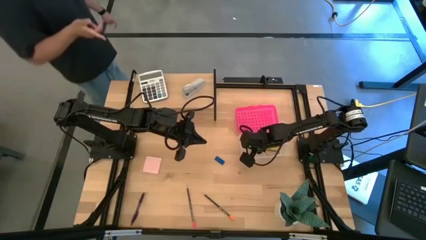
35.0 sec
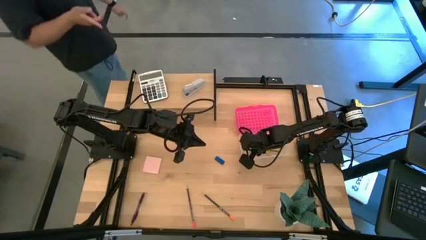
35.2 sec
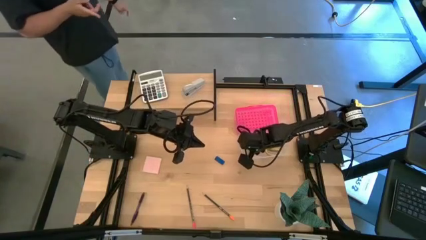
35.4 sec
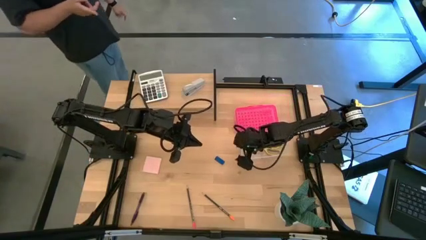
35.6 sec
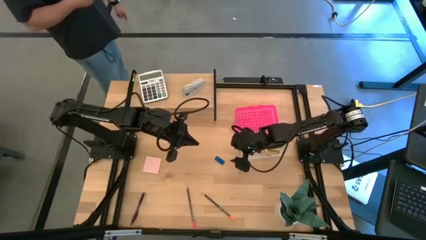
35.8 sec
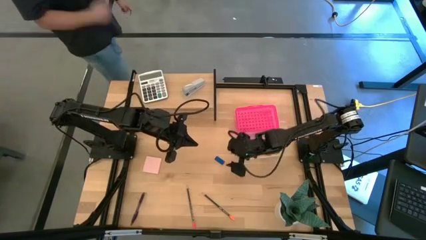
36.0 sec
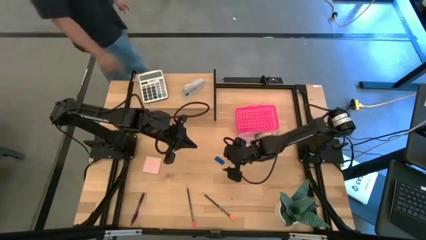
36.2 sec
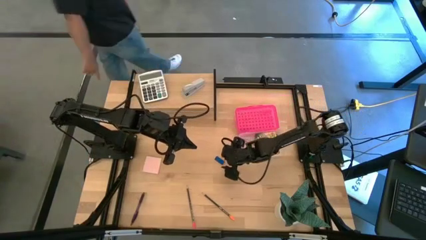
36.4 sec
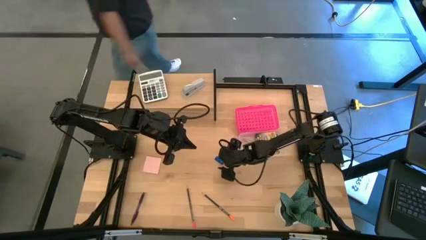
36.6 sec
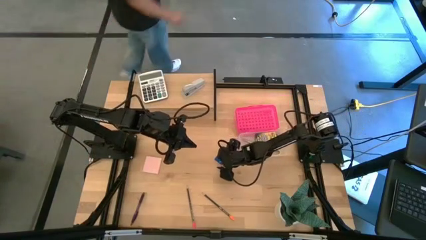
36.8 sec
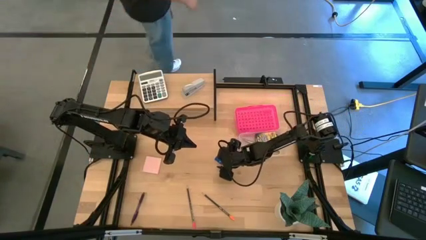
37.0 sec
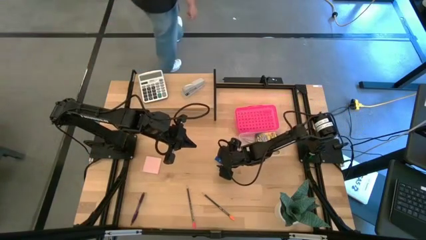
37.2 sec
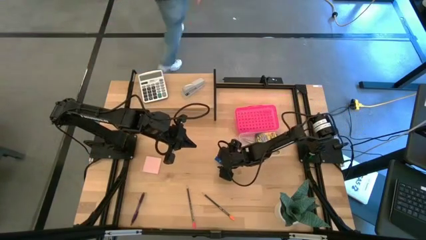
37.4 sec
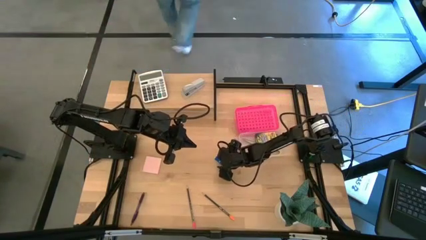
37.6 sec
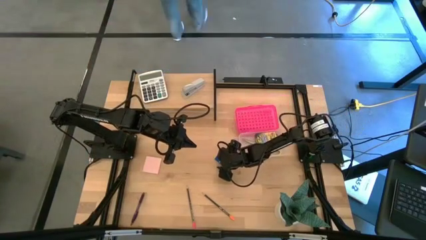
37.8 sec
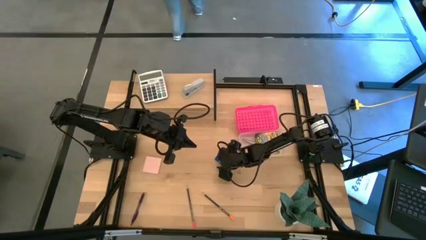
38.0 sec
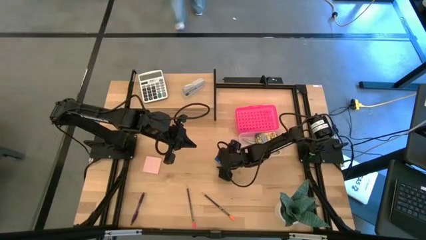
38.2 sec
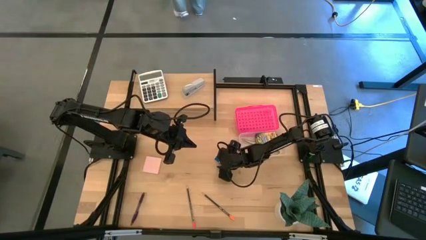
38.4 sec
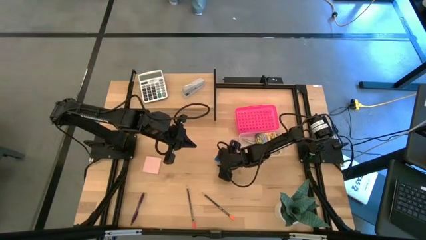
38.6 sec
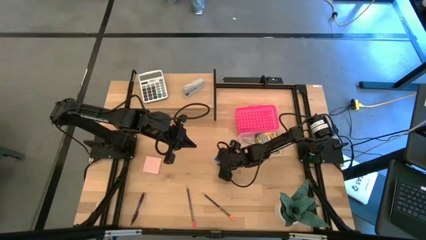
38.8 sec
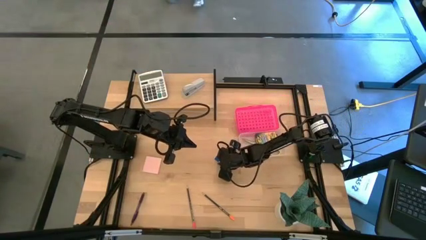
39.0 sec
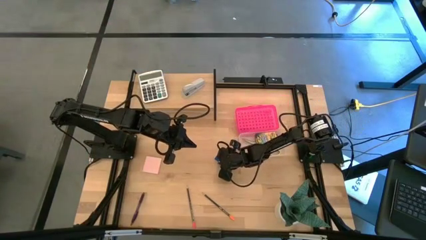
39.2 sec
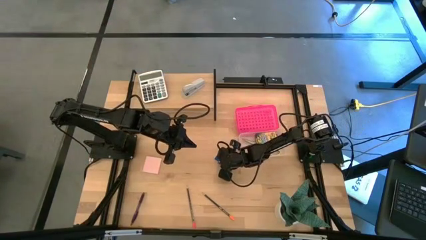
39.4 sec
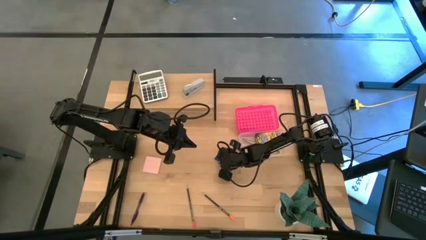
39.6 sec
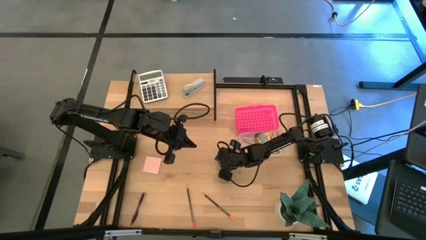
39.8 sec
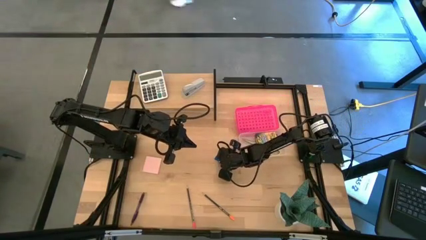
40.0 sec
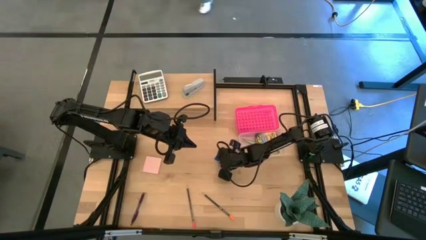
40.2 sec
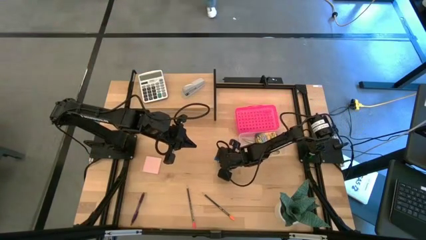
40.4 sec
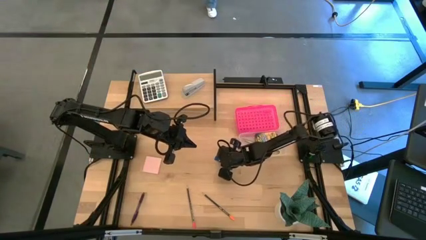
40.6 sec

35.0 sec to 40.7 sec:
Task: Pack school essentials
Put the blue eraser into the pink supply box

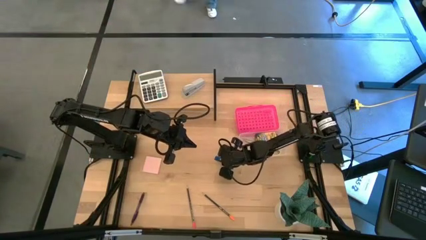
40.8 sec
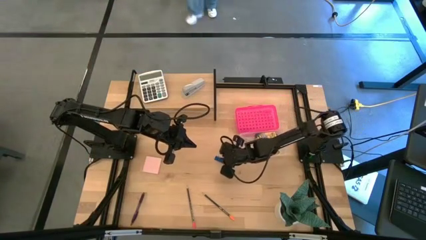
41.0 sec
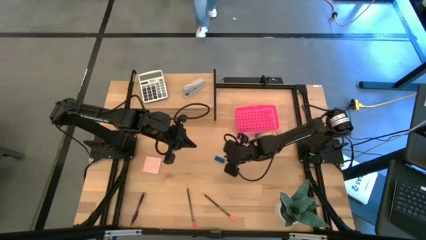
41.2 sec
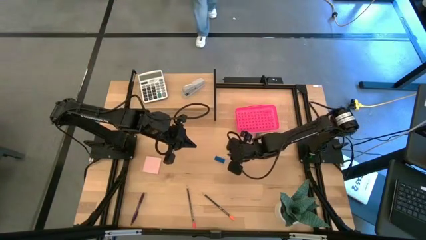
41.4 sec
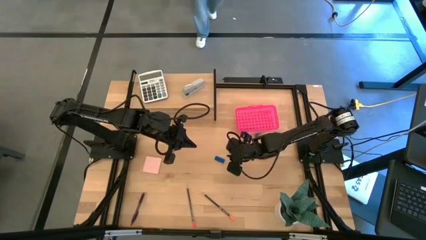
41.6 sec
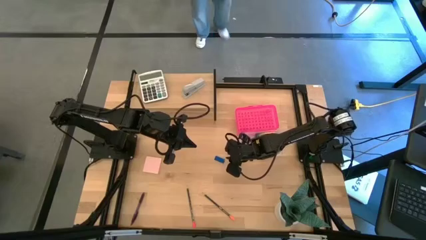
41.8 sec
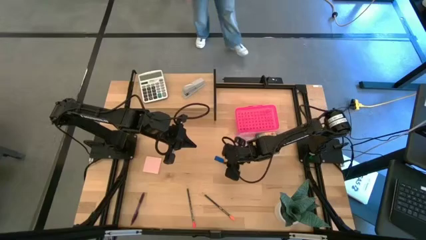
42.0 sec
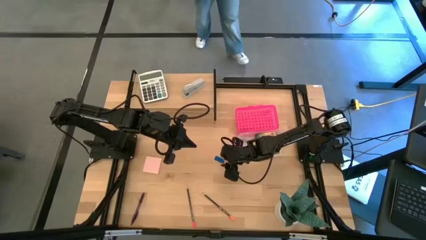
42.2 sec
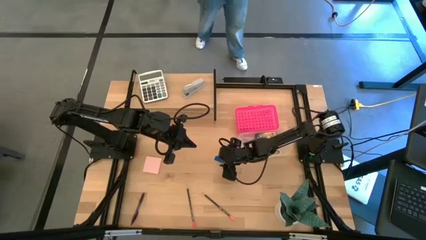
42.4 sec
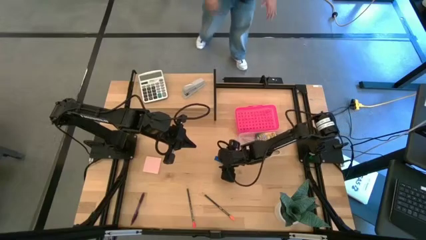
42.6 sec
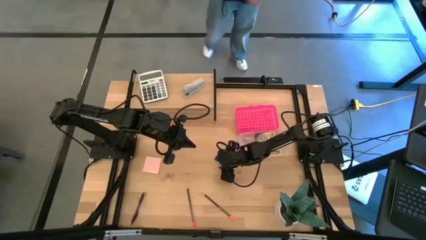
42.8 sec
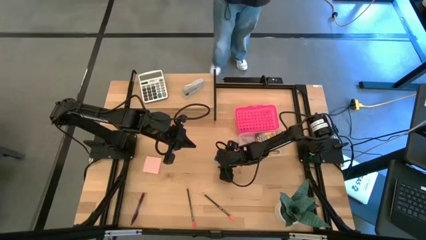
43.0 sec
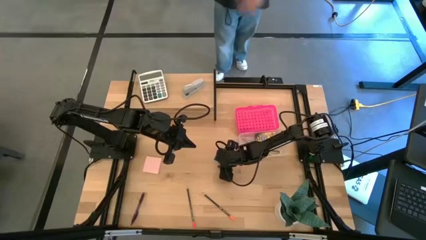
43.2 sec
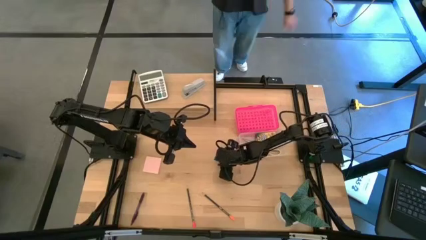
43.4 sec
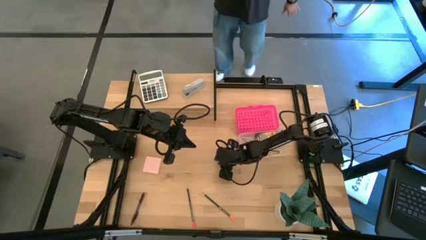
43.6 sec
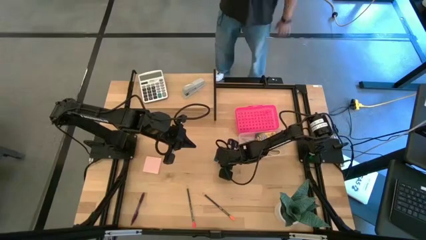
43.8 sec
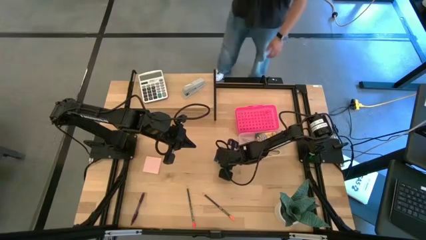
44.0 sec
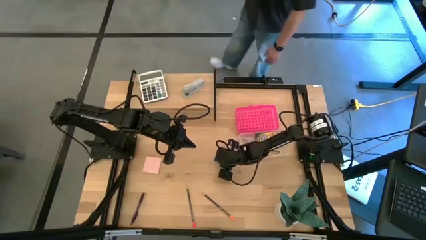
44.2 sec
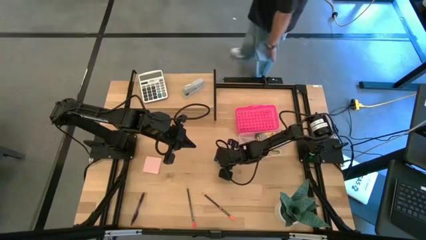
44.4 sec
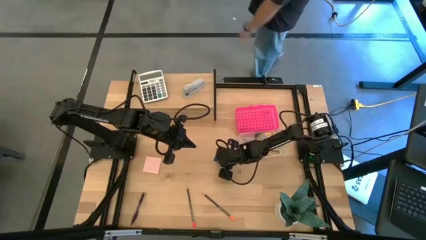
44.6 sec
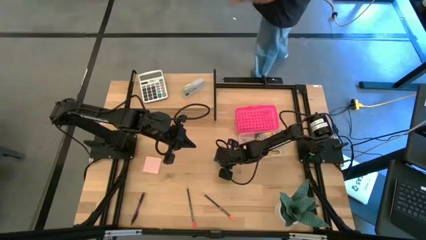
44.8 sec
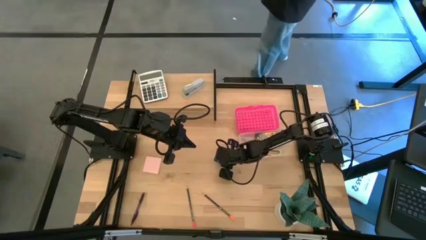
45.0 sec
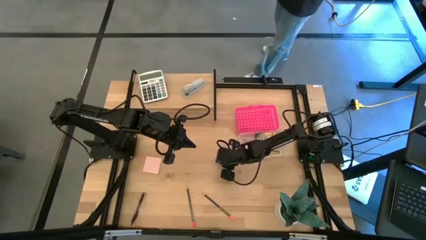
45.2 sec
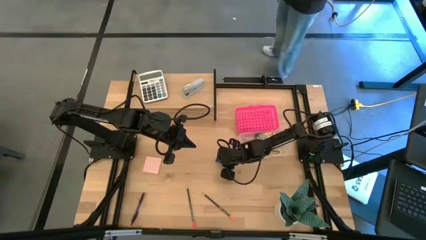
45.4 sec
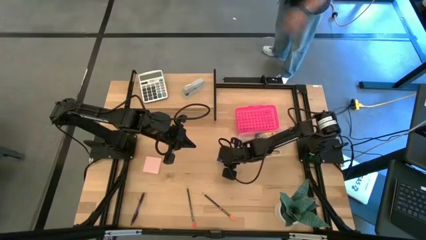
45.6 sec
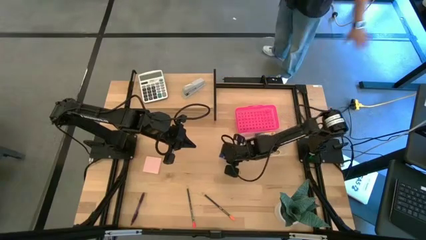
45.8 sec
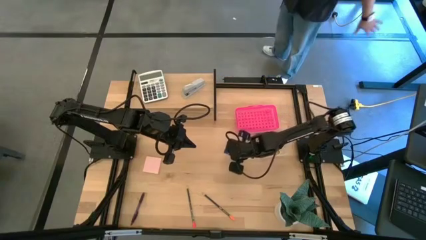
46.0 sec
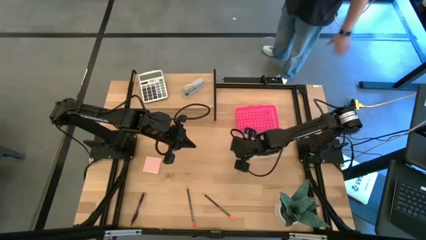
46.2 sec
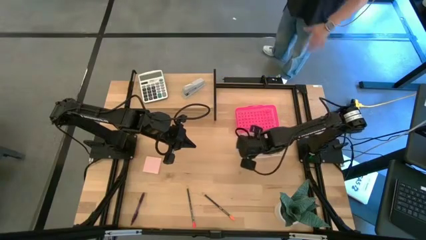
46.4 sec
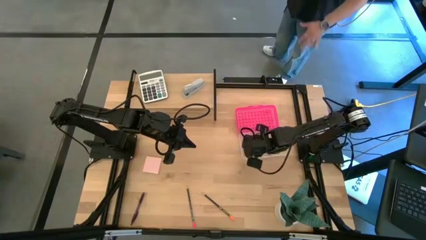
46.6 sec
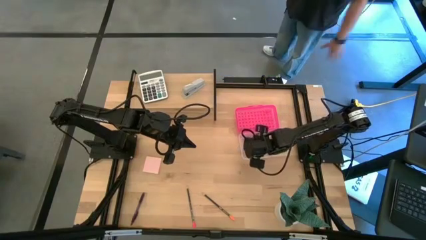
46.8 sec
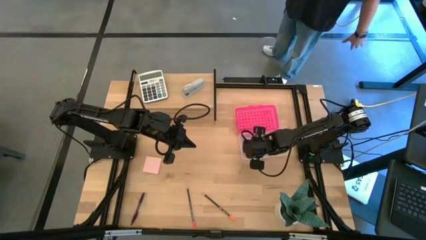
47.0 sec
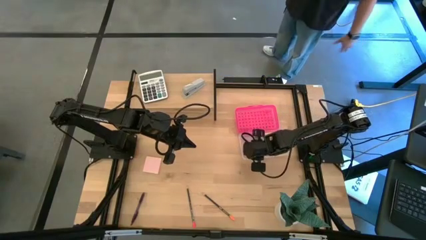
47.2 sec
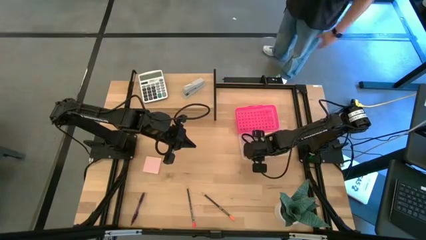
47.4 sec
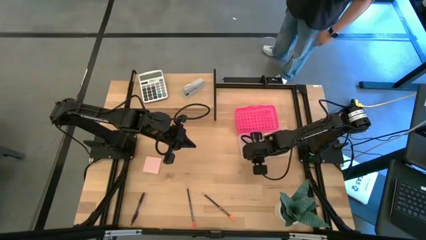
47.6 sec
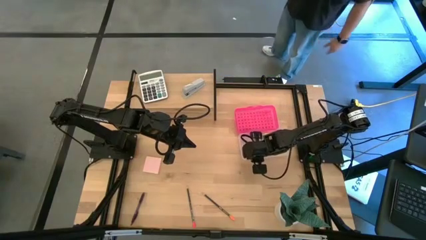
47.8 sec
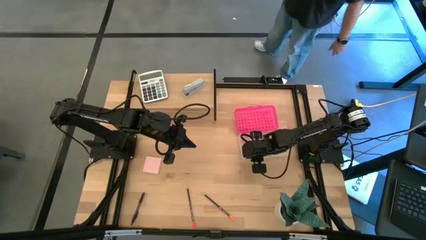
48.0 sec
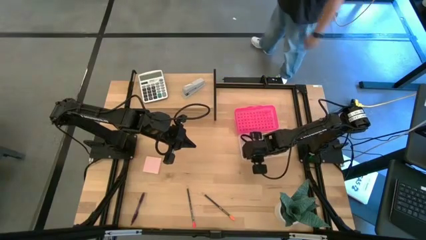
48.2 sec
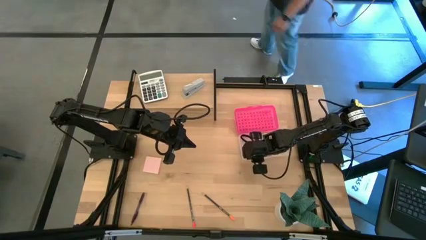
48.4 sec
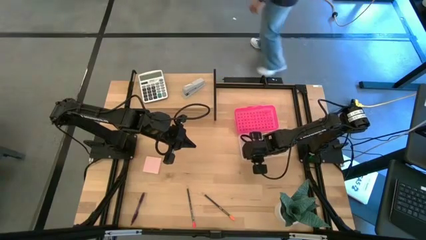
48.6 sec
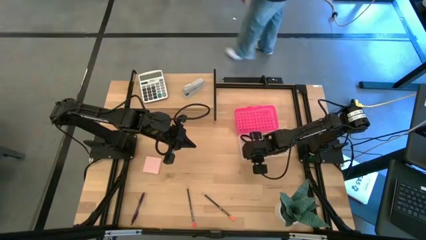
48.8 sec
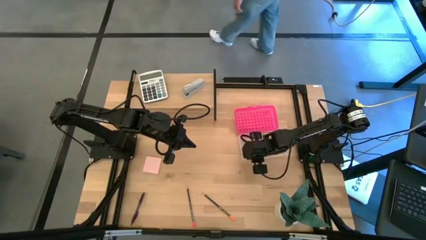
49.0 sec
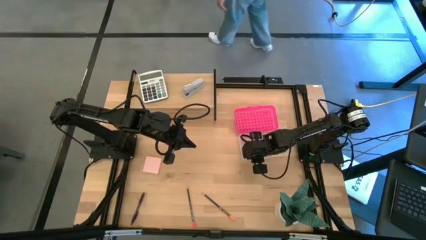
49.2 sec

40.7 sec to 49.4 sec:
Put the blue eraser into the pink supply box

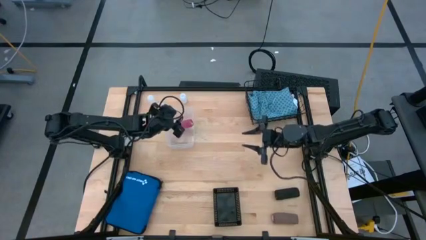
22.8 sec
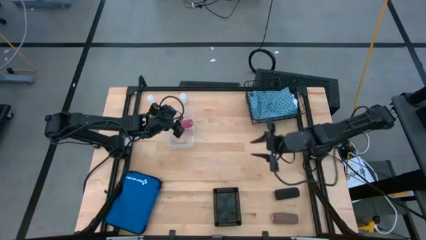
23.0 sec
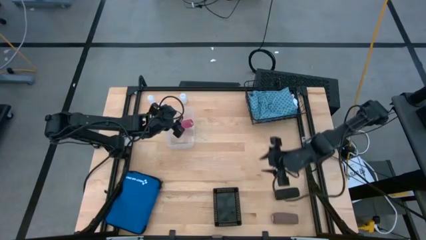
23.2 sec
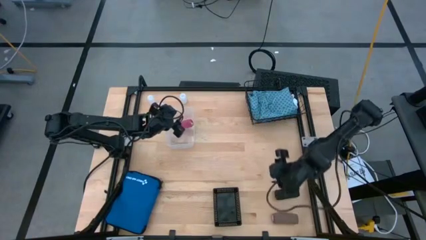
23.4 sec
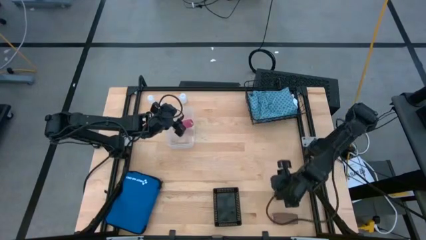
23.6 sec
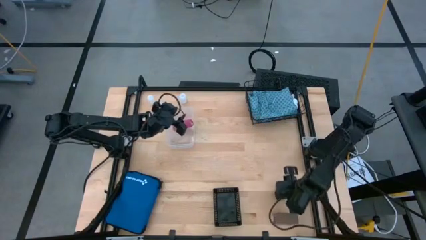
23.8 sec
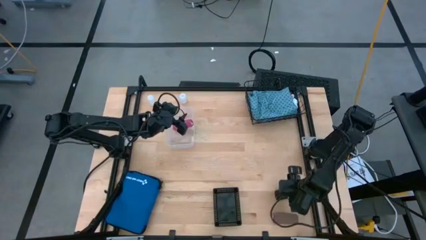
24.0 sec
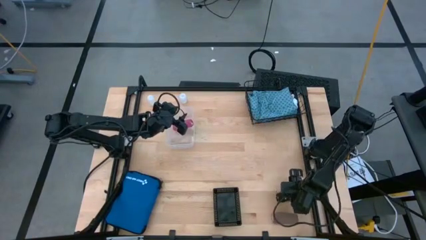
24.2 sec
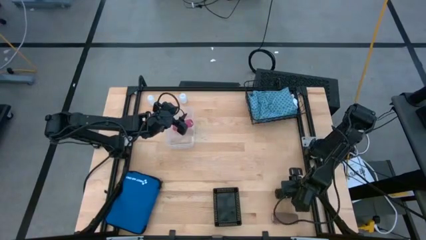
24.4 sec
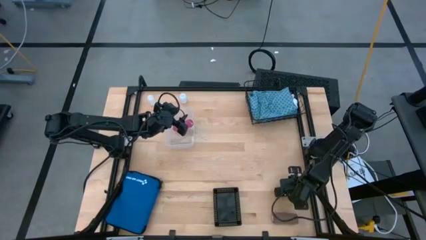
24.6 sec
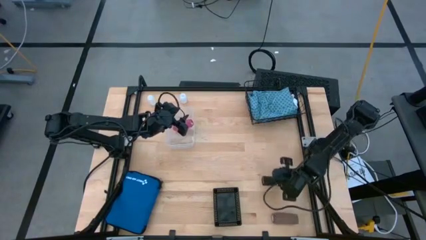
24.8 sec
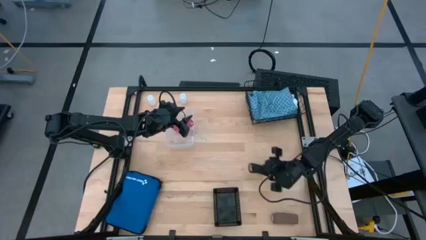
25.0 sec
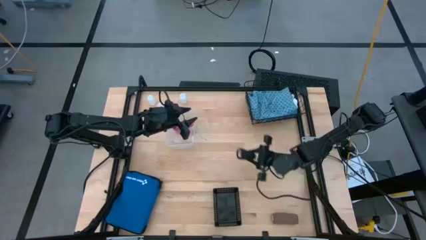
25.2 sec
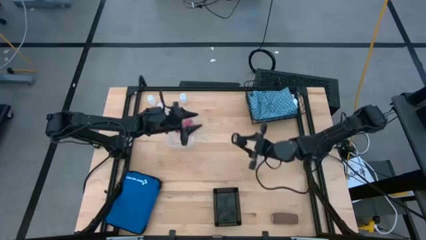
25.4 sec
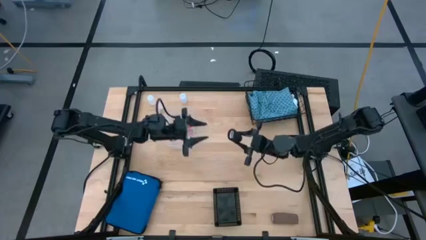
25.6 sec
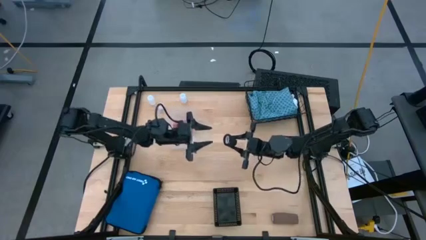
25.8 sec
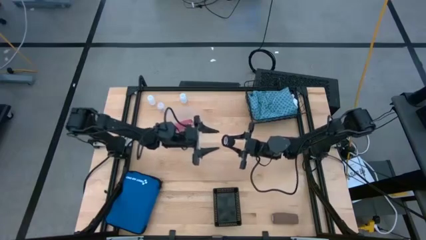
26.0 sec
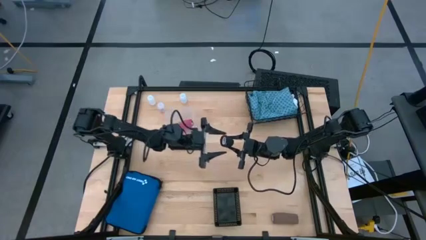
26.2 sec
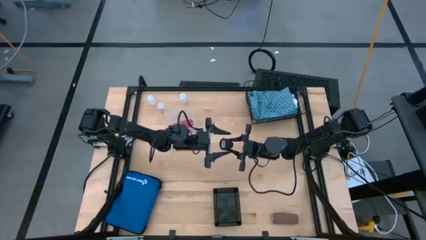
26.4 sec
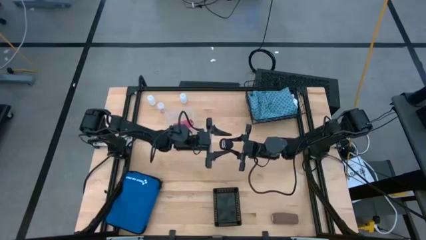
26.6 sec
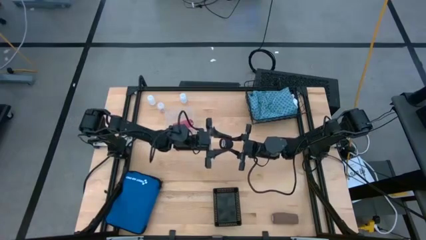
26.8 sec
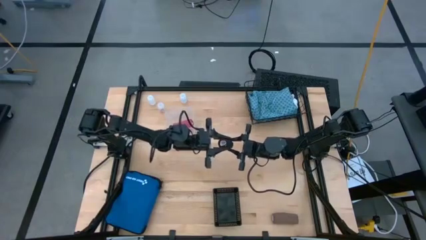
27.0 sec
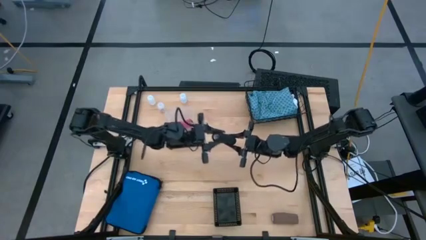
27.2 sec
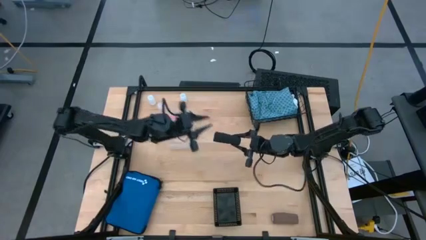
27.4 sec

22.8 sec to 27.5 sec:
Task: Pick & Place Medicine items
Put the black bandage into the transparent bin
